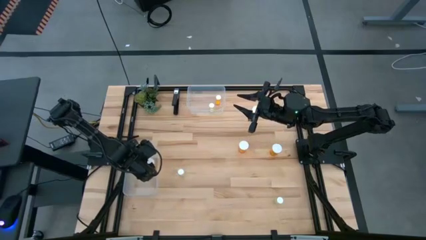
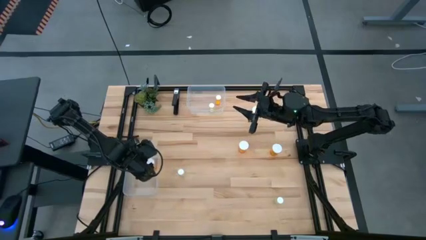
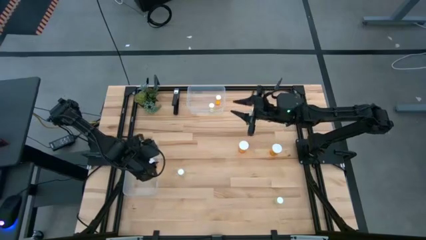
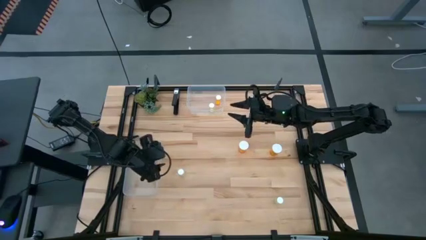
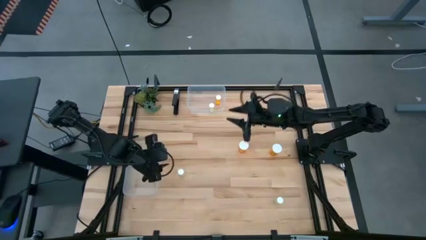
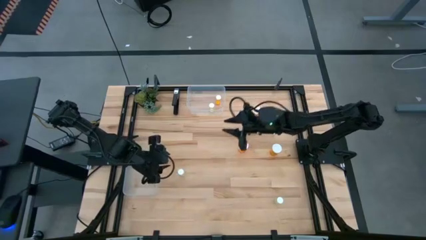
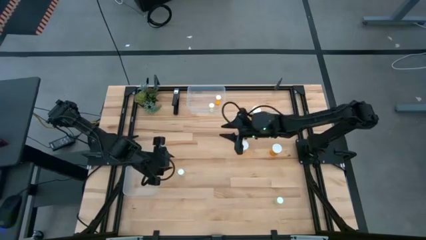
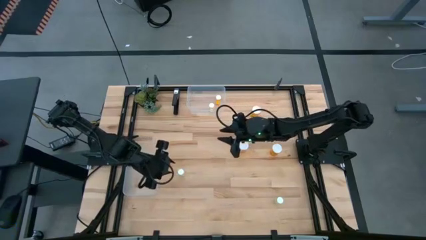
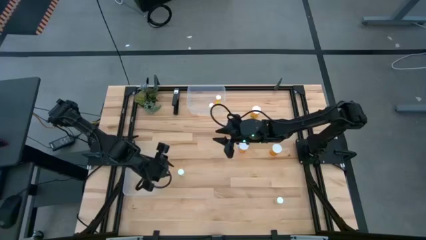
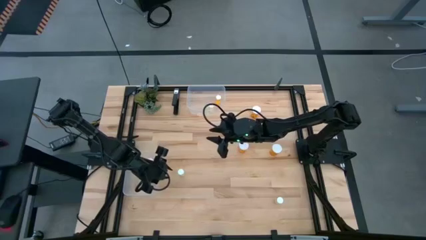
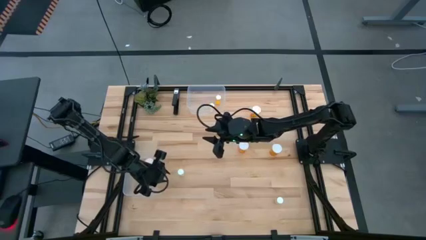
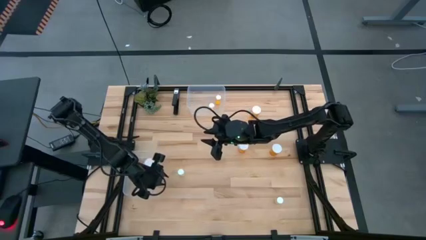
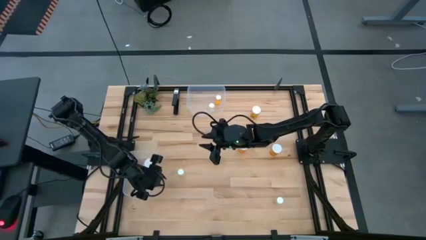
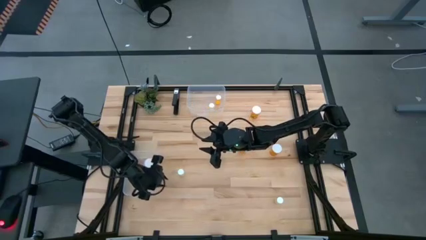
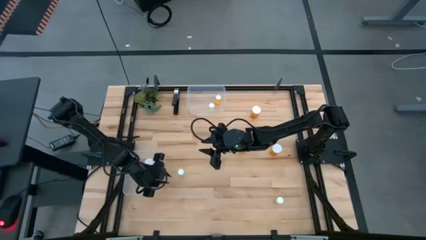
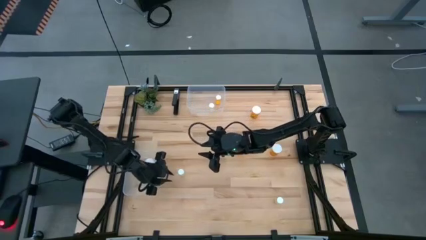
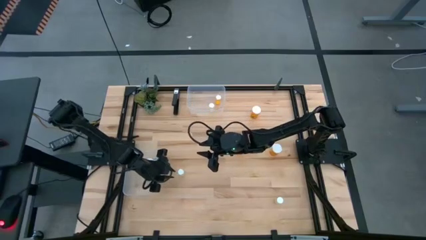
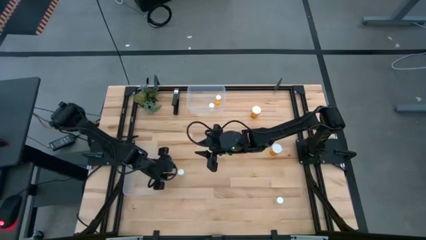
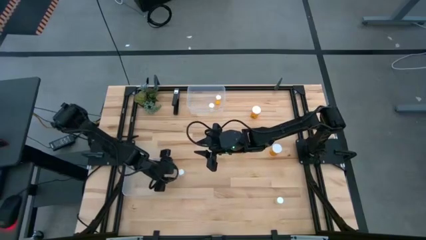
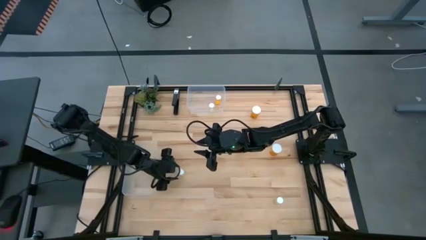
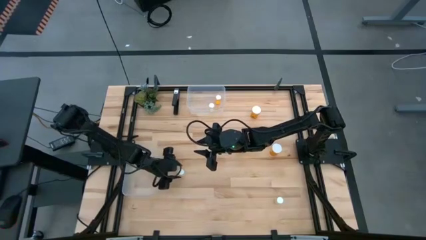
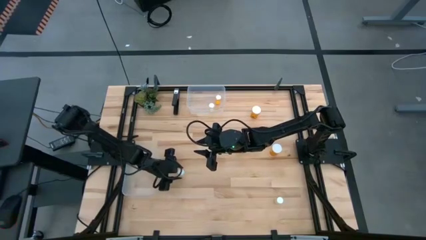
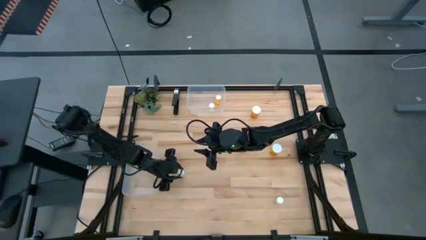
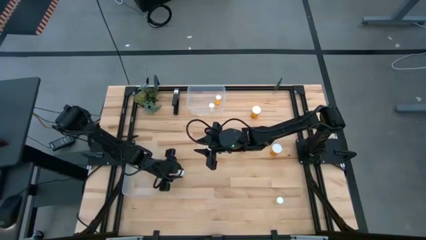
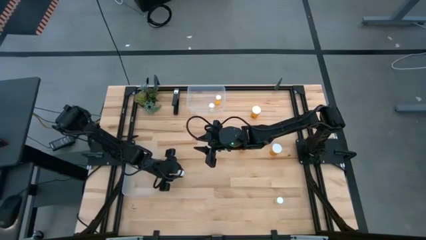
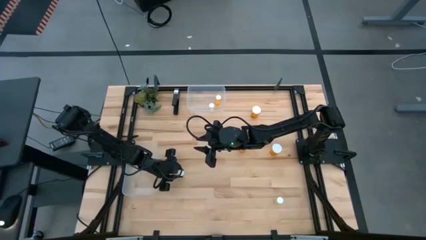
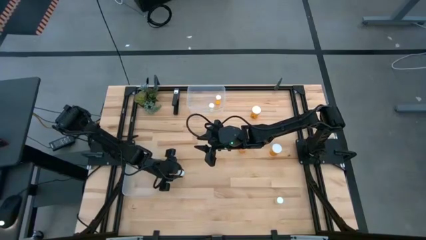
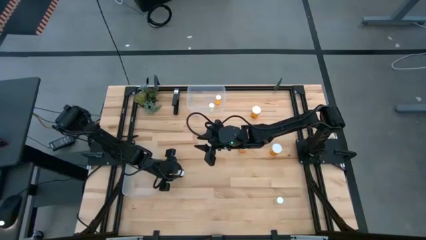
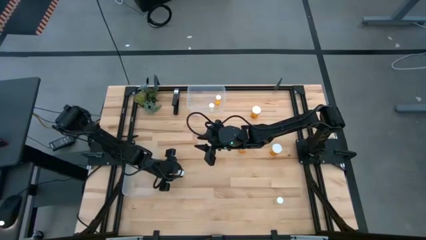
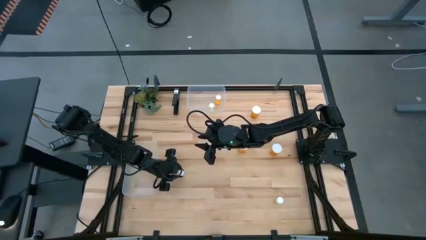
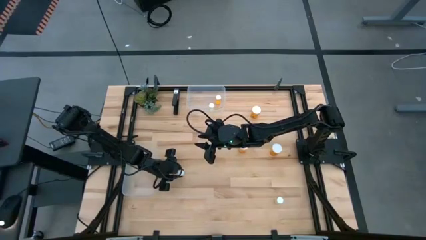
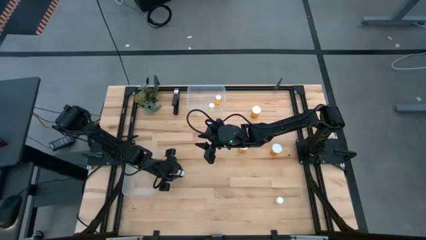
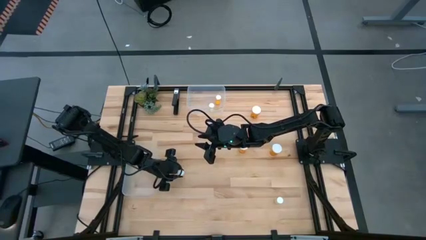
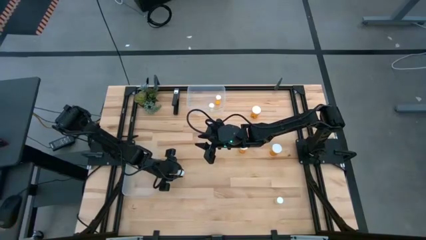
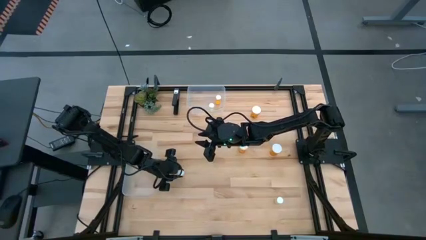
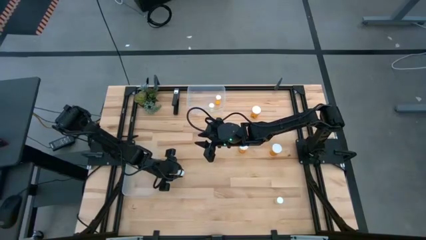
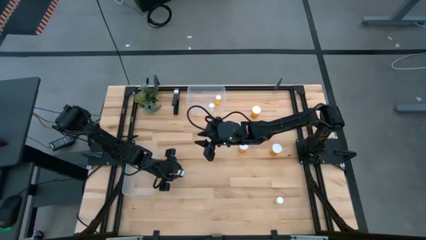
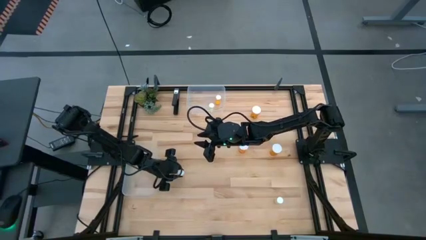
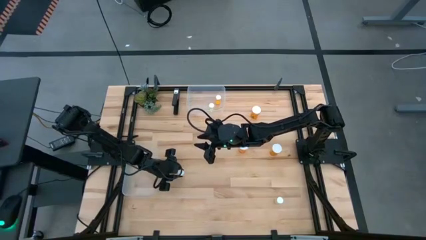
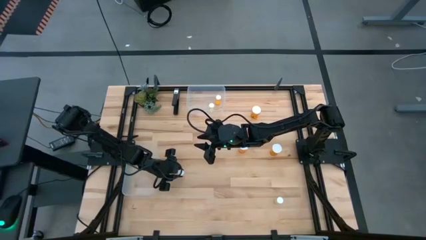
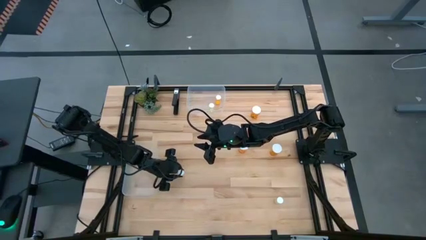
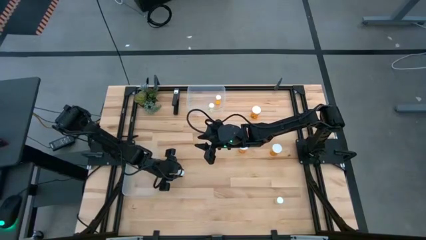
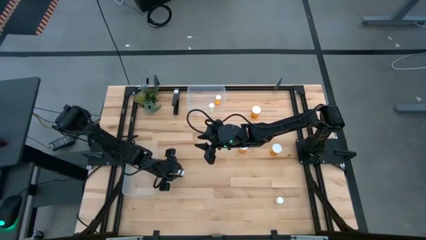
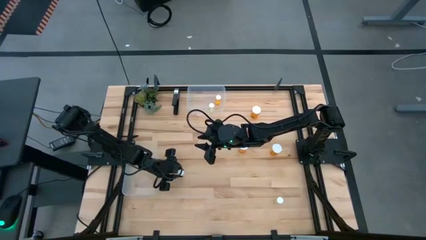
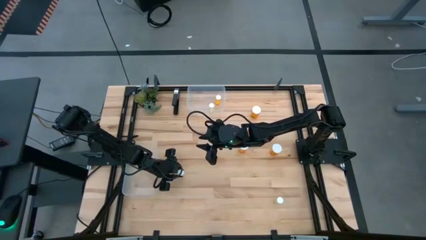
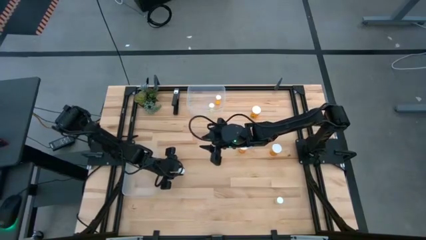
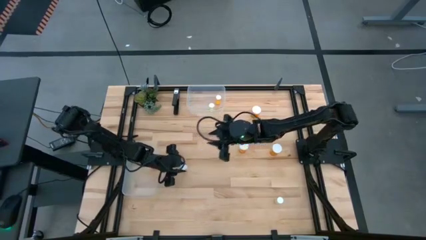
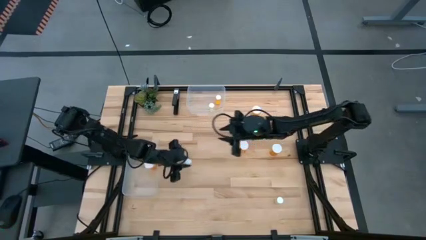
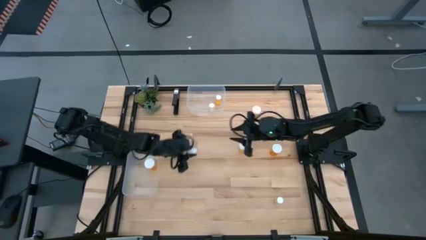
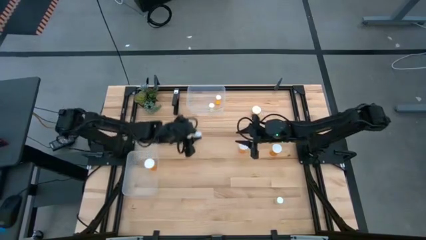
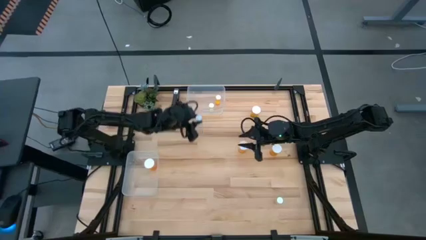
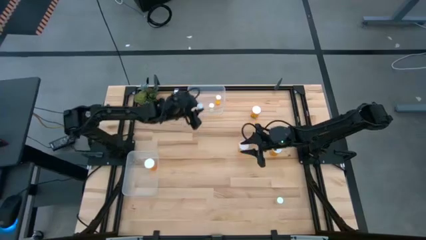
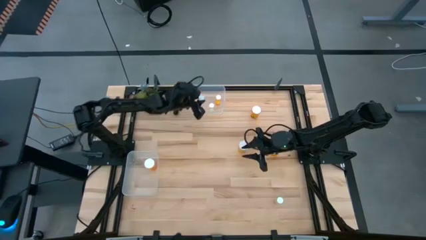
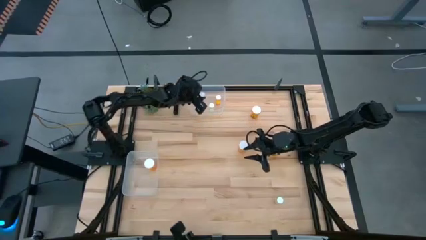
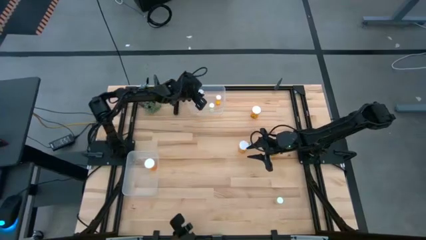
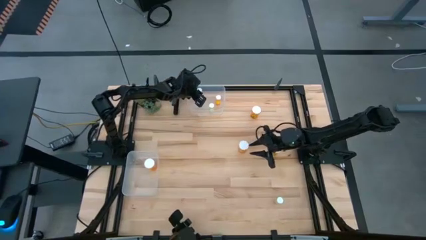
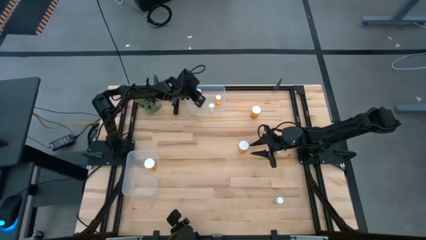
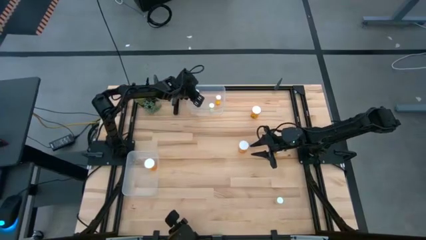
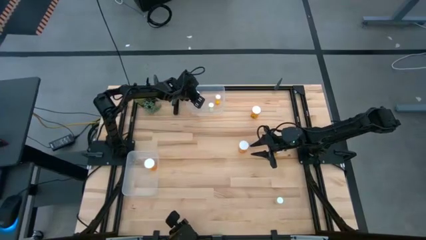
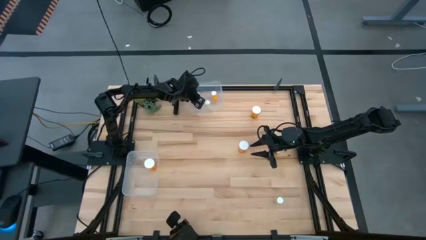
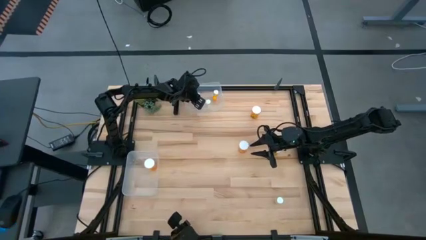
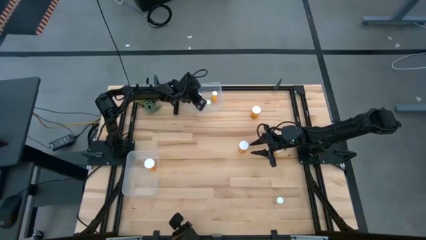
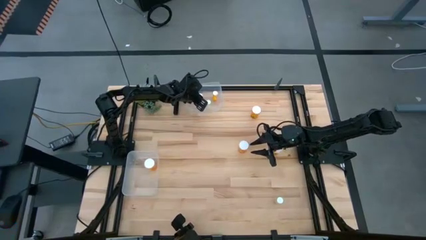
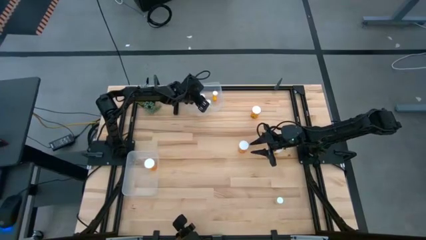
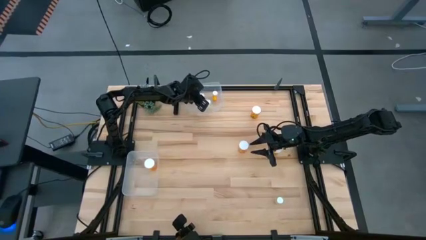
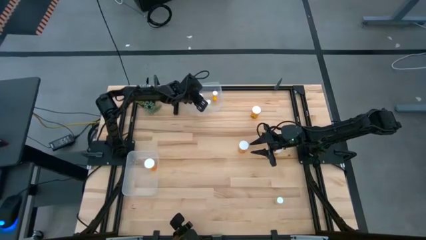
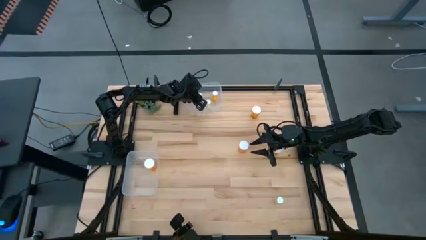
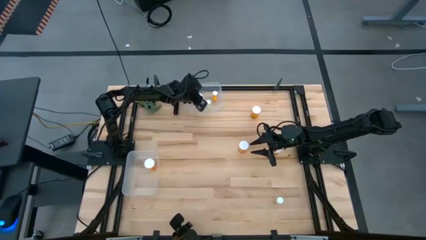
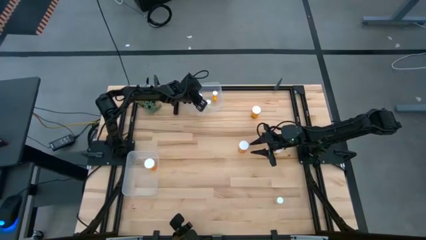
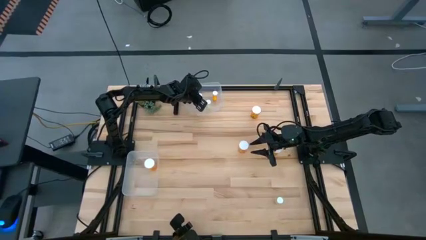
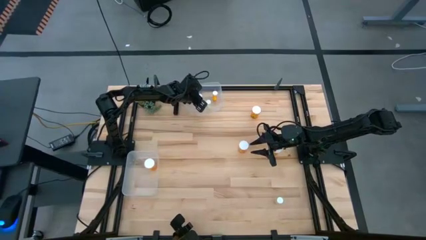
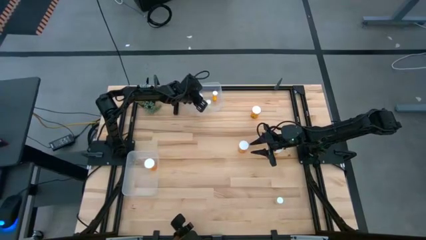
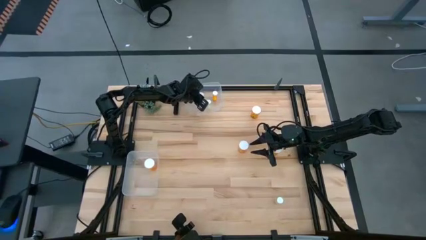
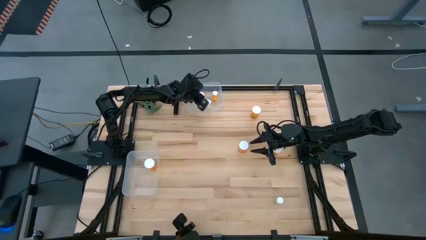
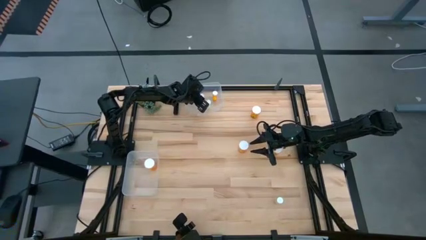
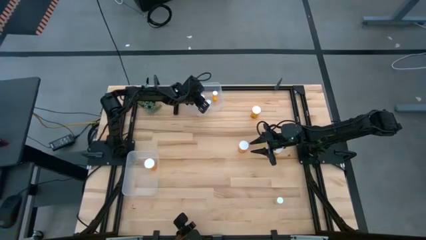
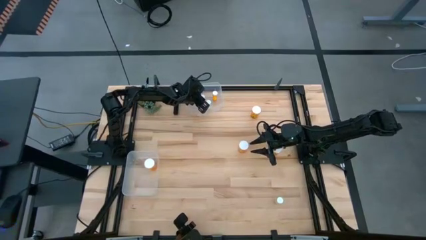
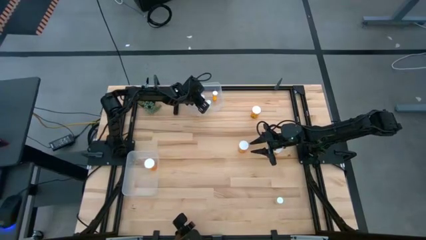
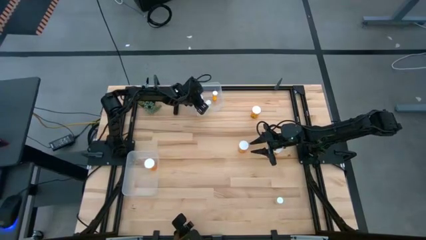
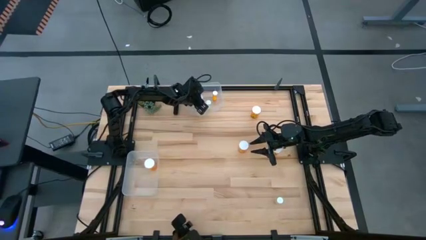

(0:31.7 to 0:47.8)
Task: Pick and place medicine bottles into bin by pill shape (circle, oval)
Put the left small yellow pill bottle into the top transparent bin
